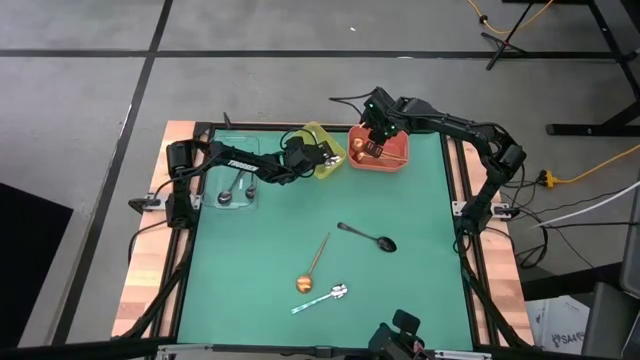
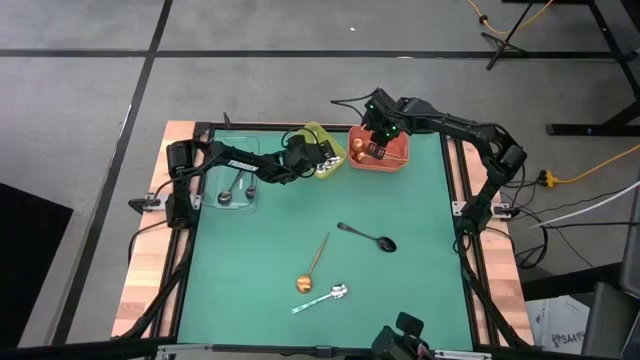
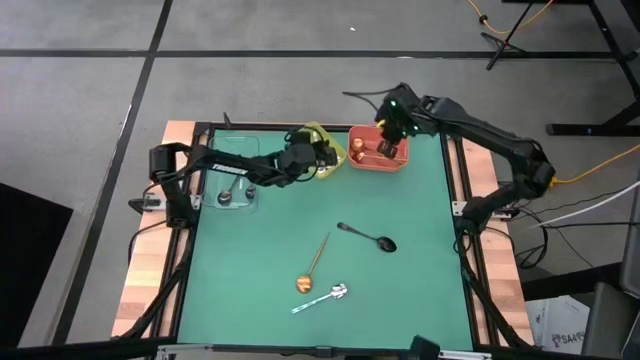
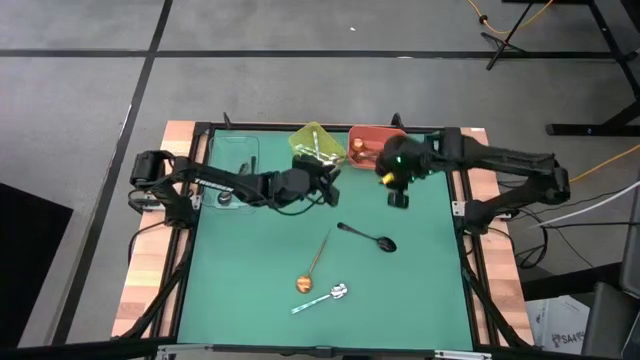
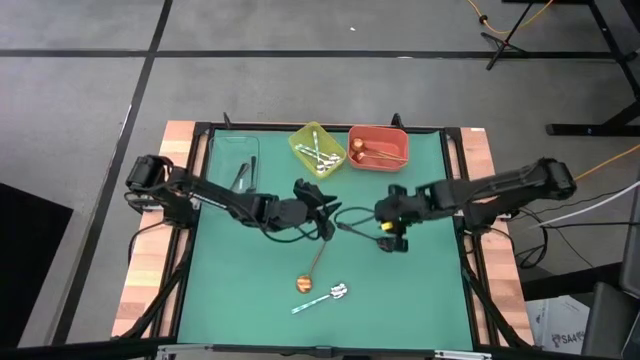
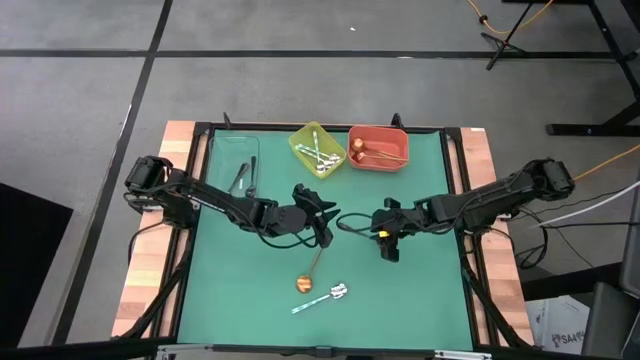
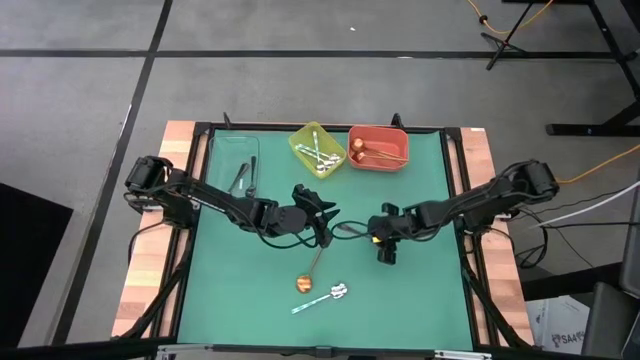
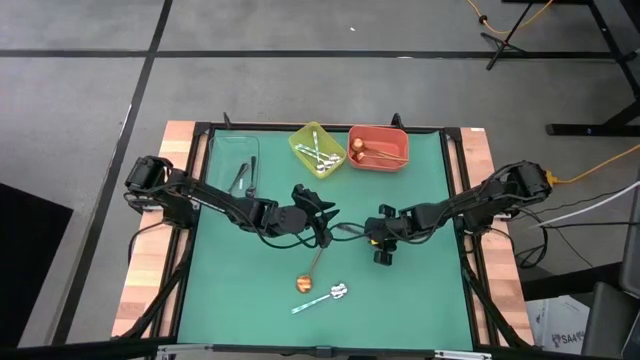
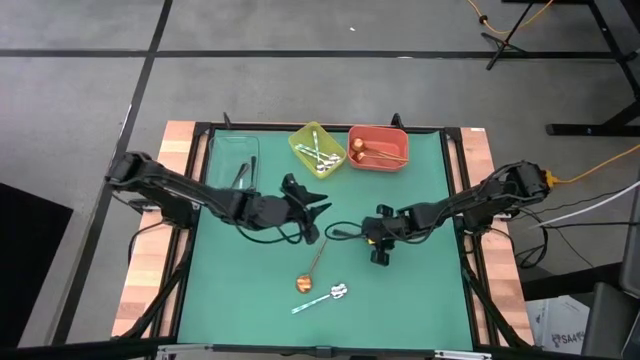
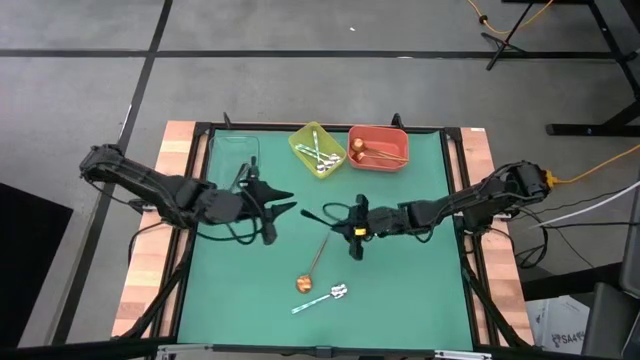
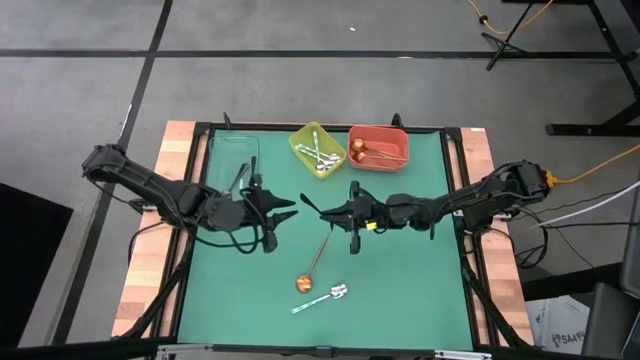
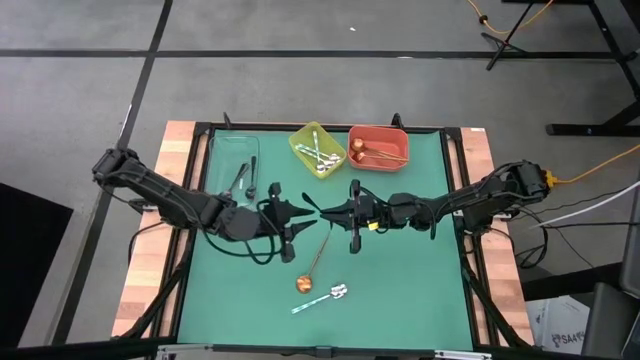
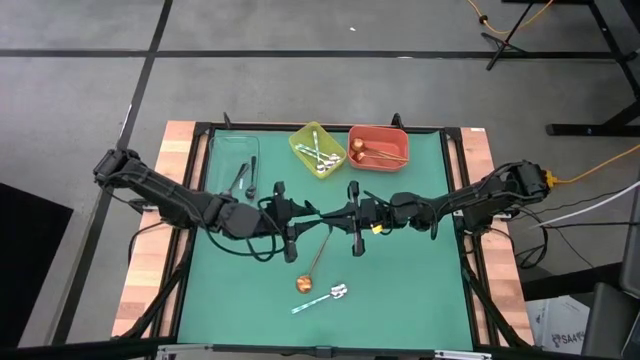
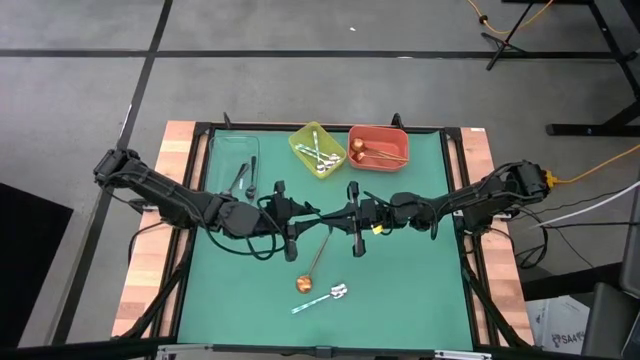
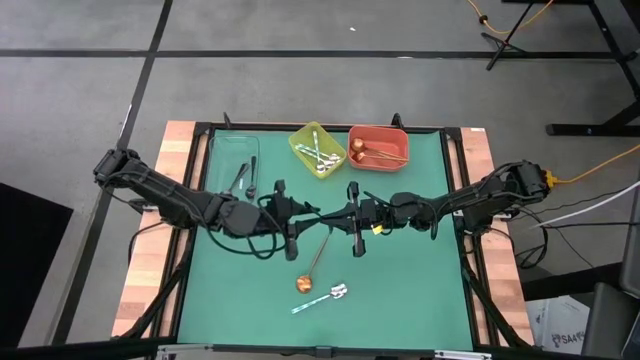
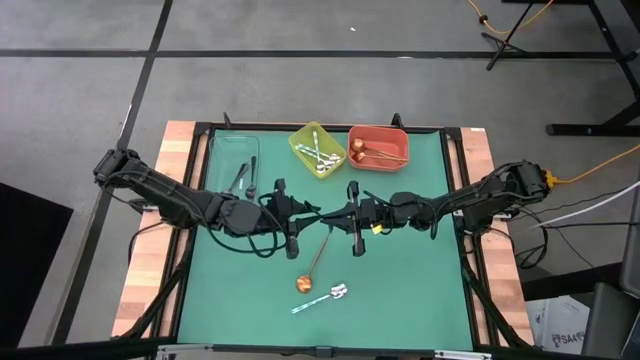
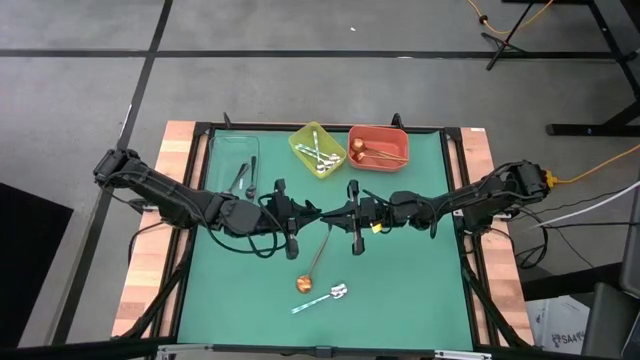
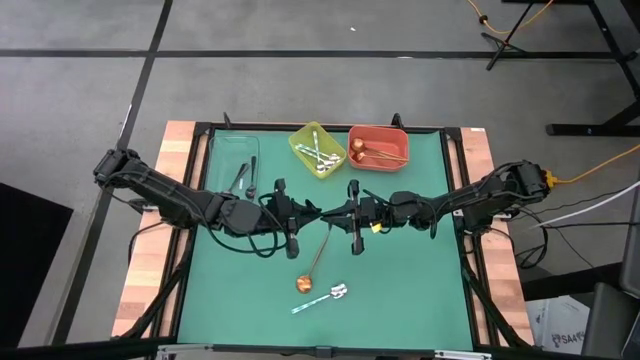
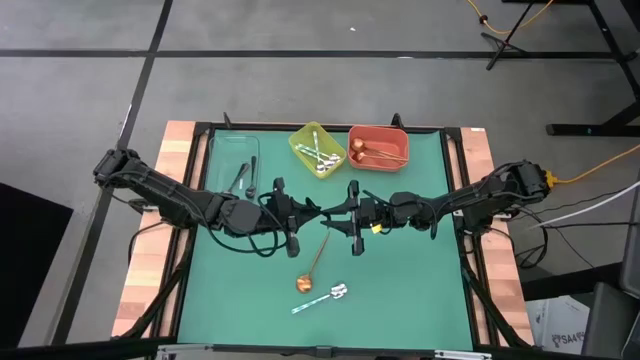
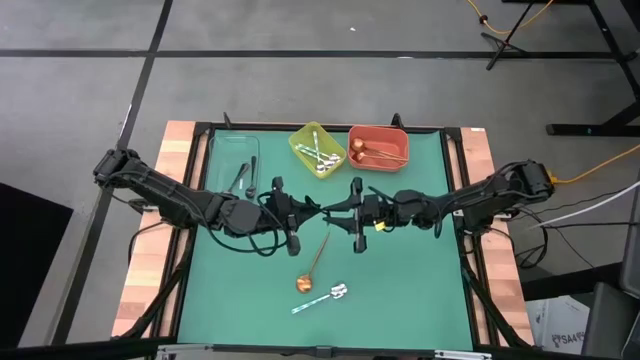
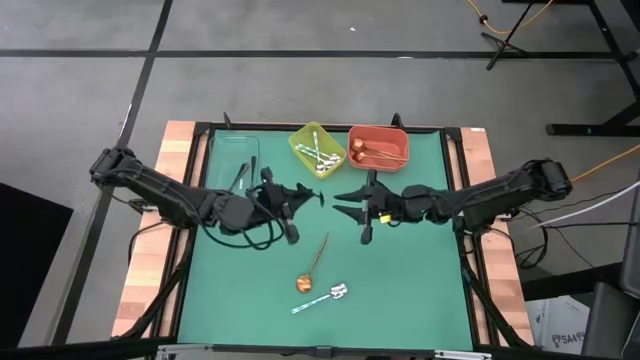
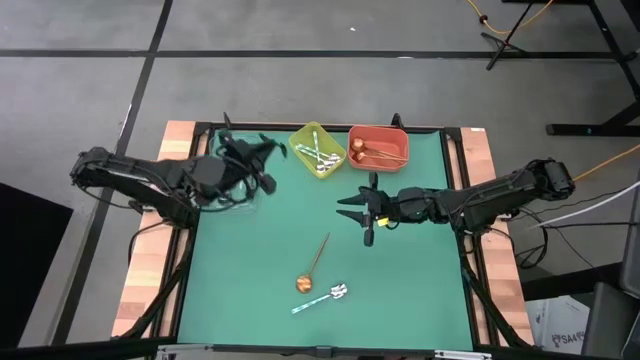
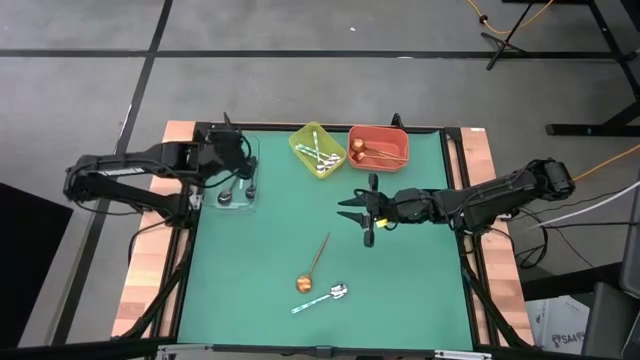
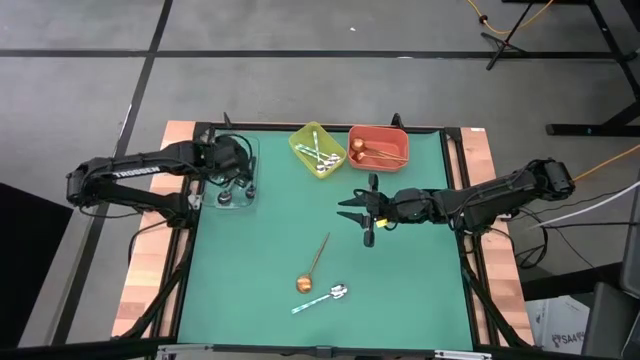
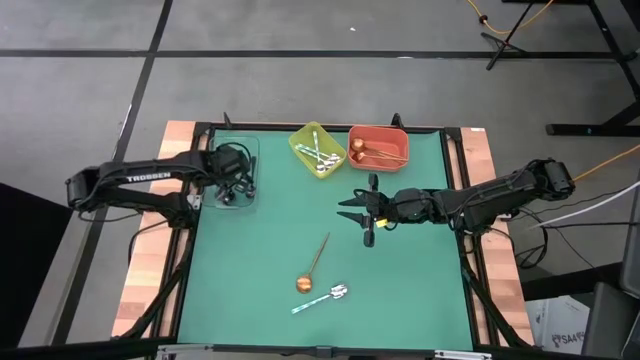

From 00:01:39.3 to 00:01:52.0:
Task: Sort silverware by color (type)
Put the black spoon into the transparent bin

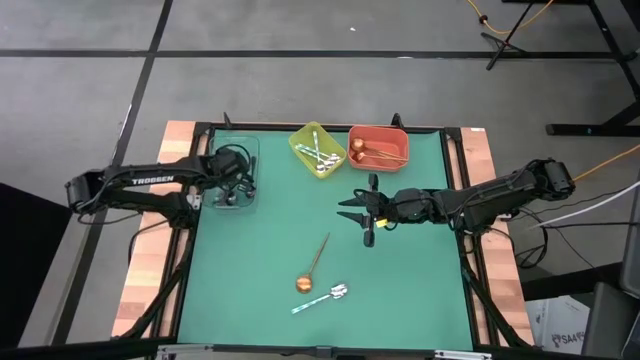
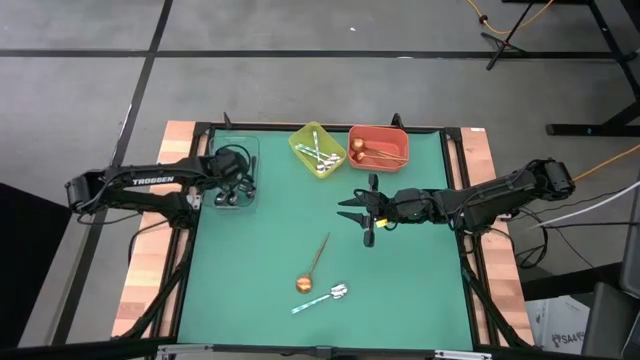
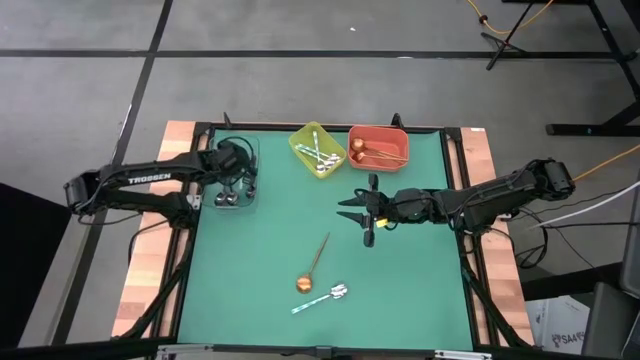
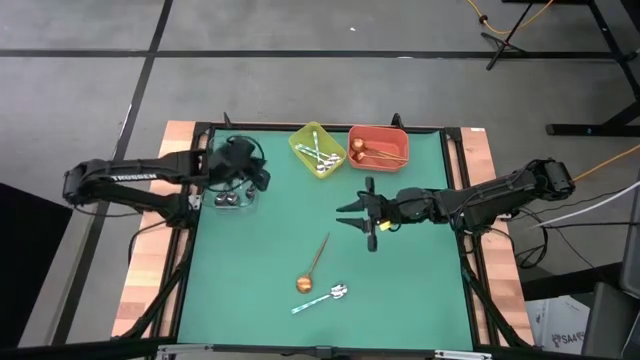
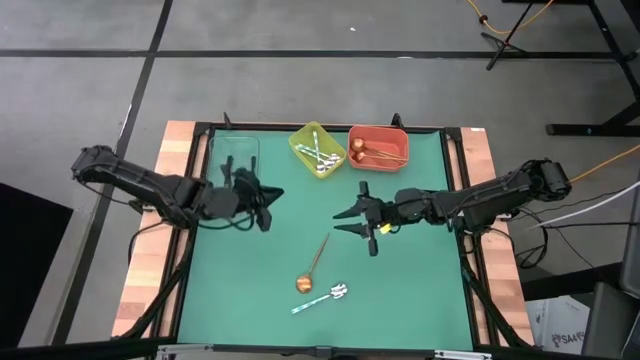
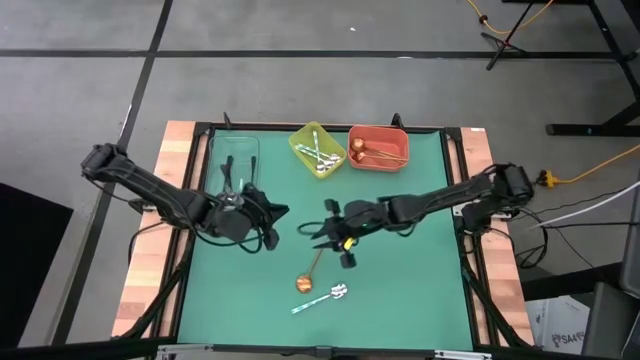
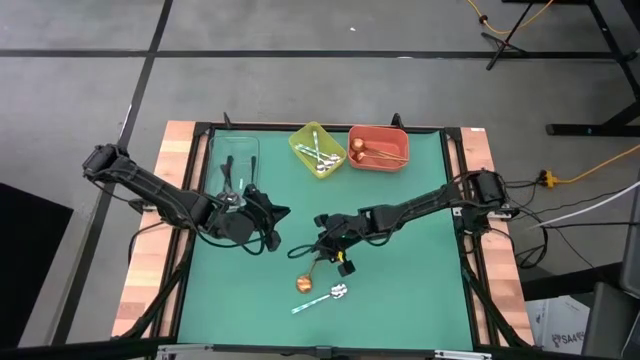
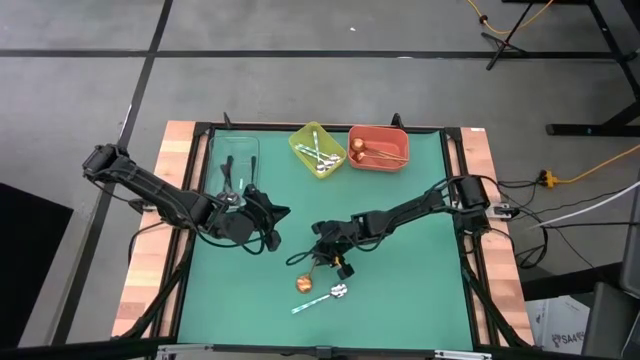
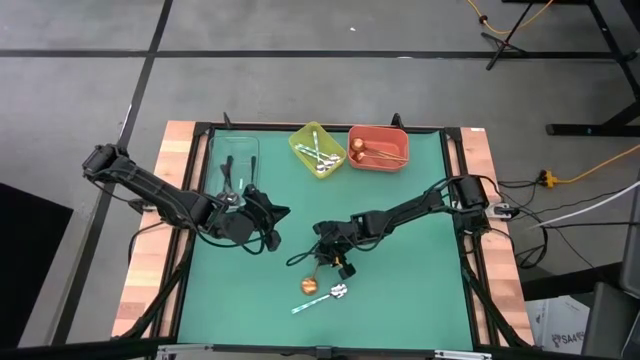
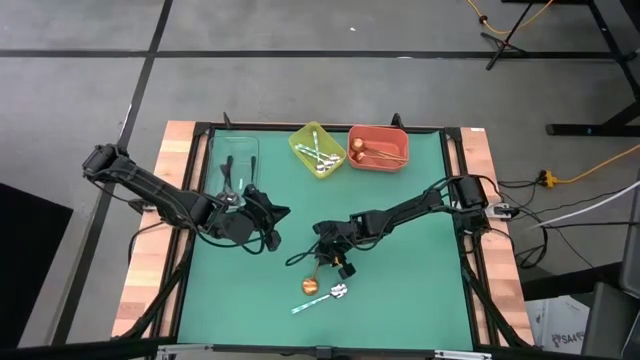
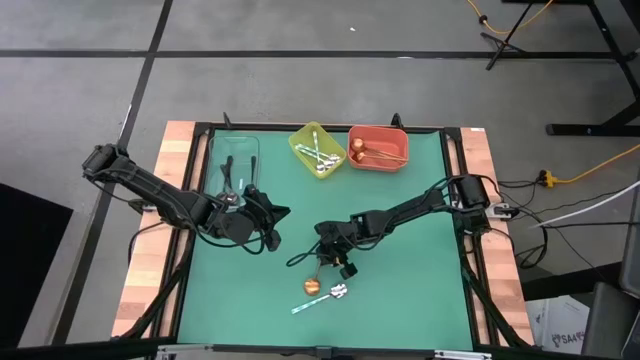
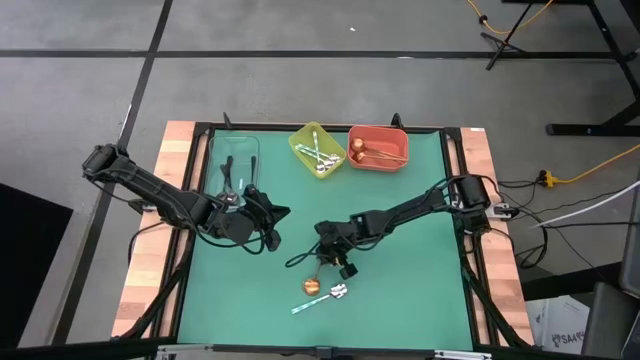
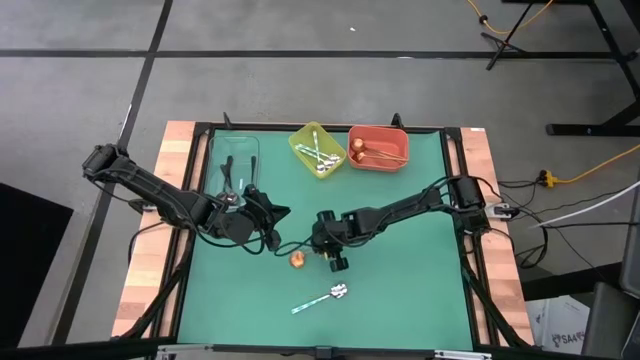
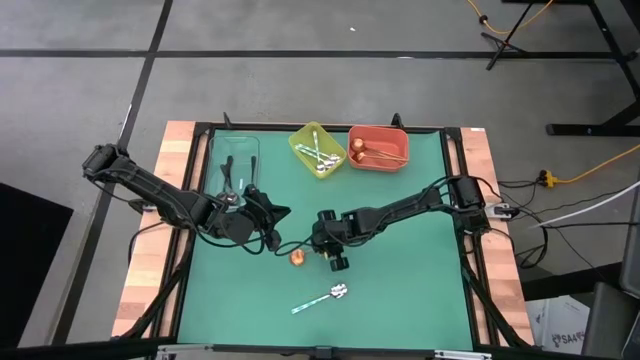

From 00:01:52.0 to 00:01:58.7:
Put the gold spoon into the orange bin

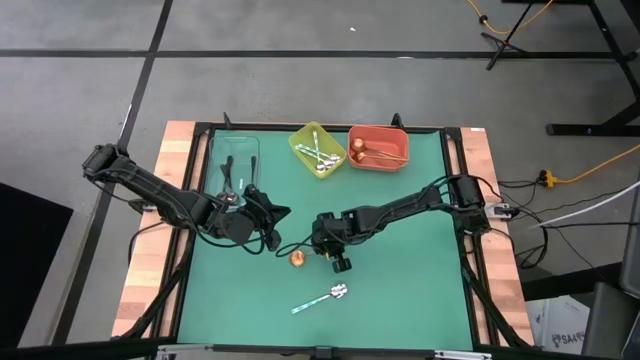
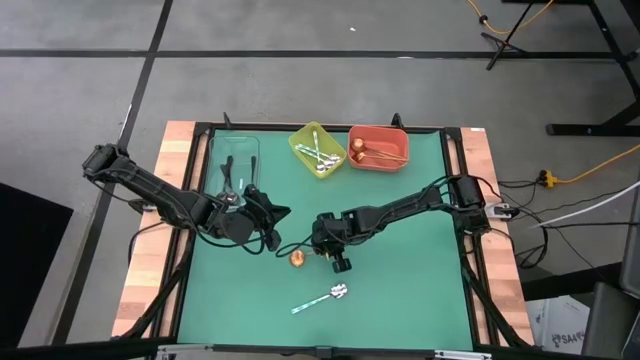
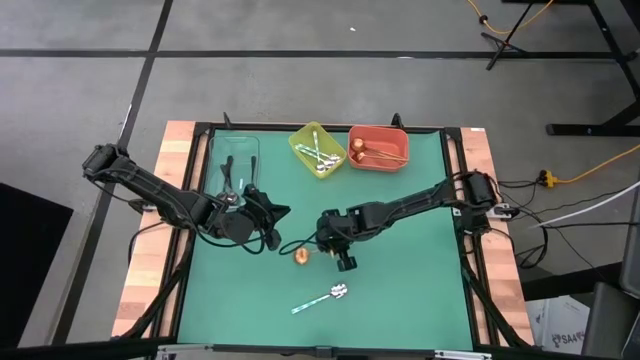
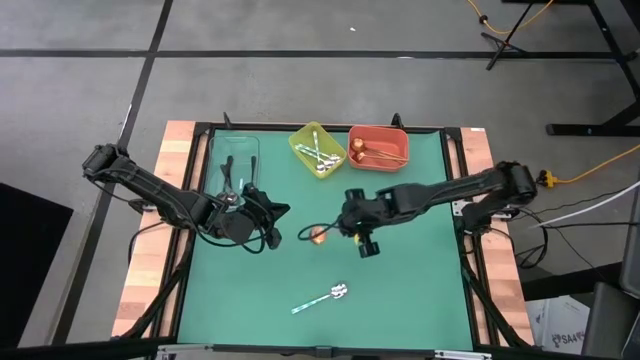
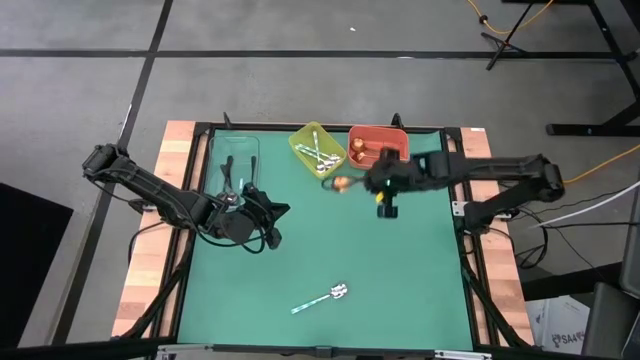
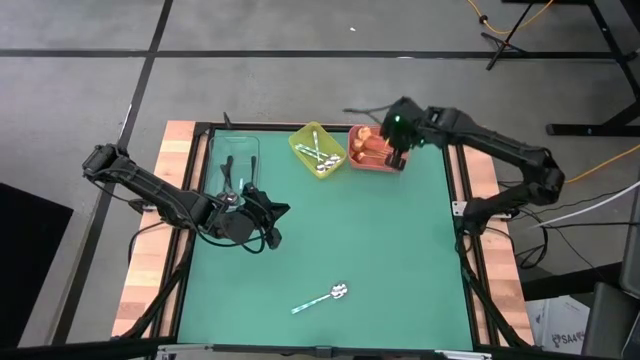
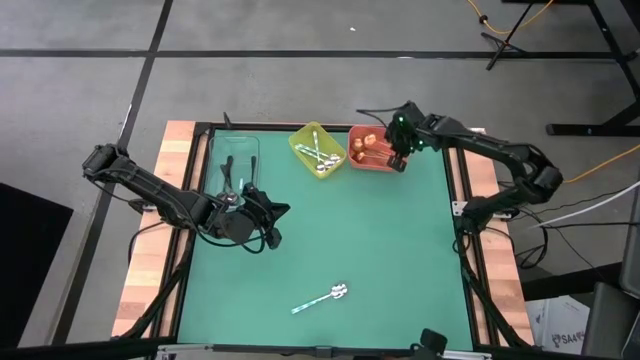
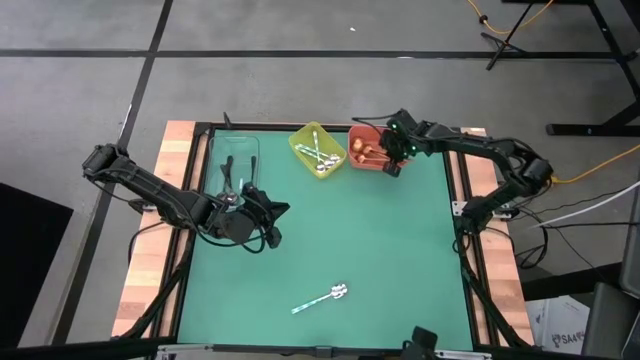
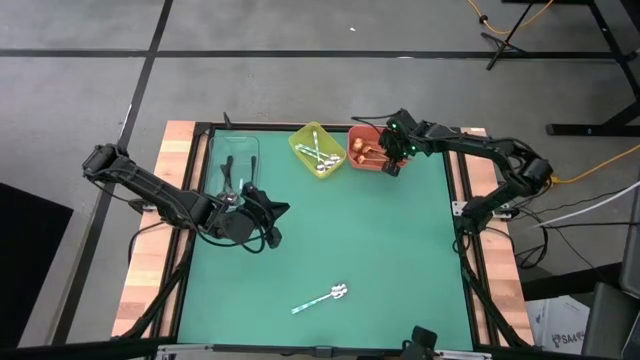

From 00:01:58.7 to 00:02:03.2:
Put the gold spoon into the orange bin
